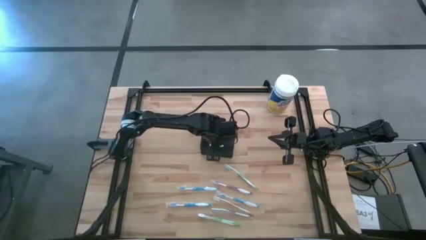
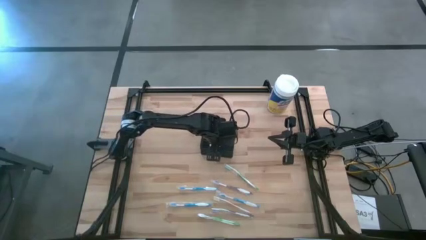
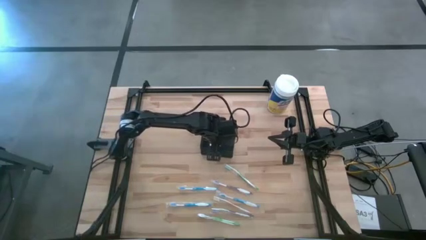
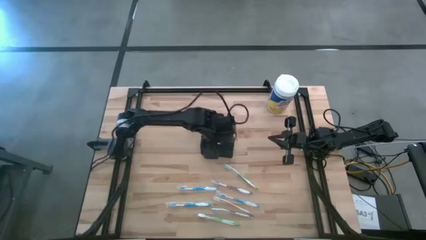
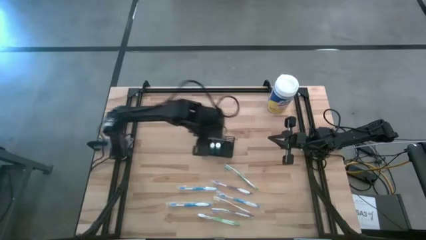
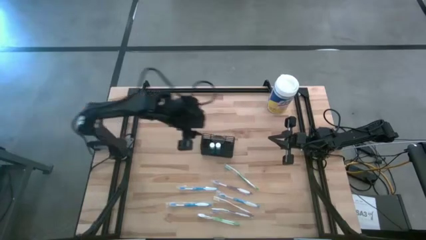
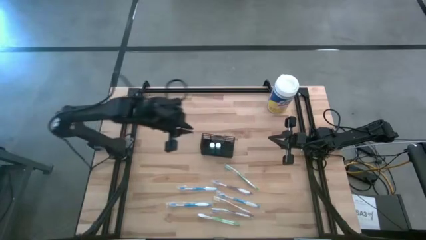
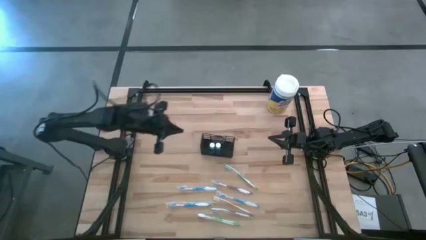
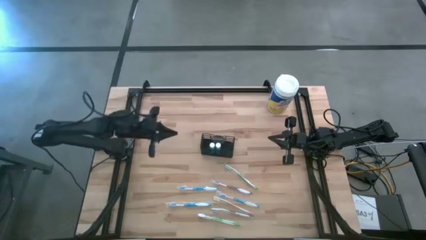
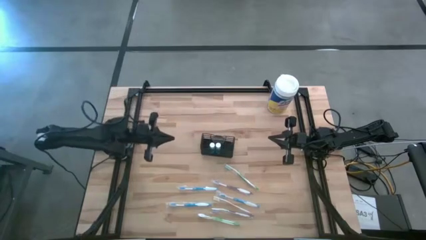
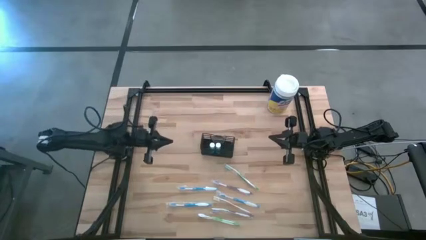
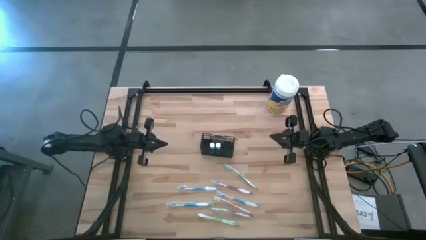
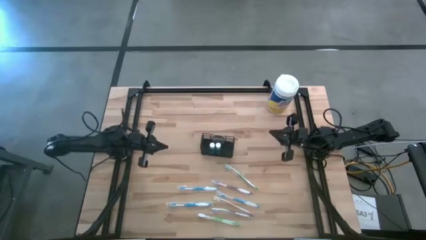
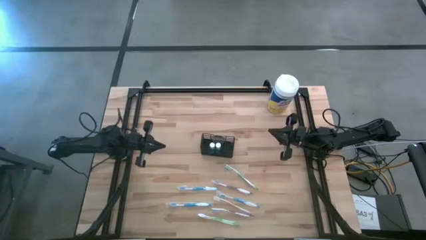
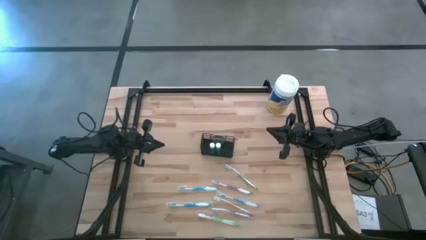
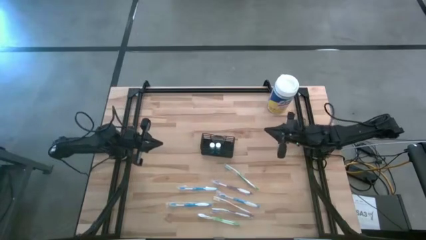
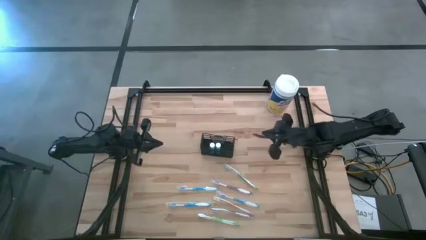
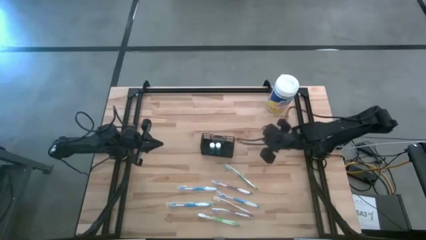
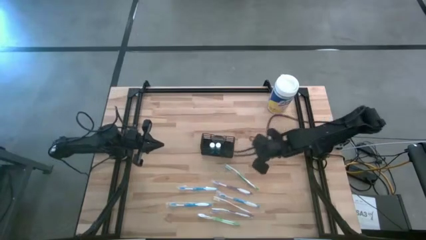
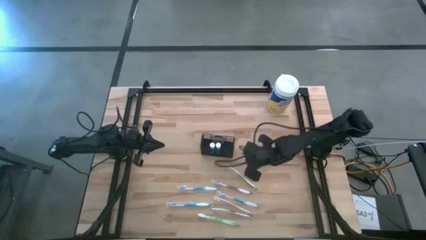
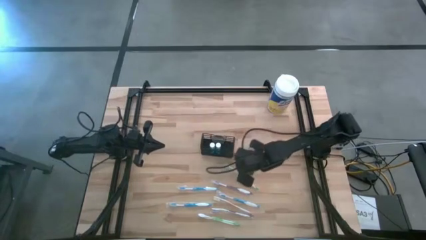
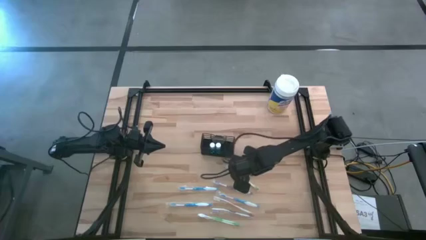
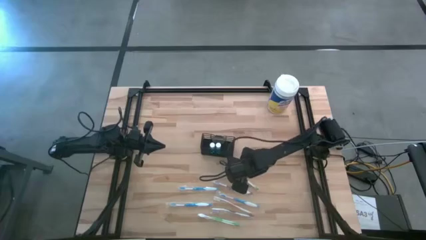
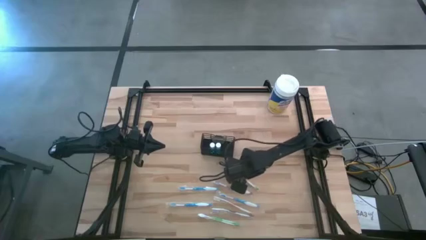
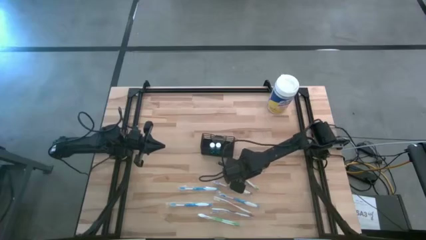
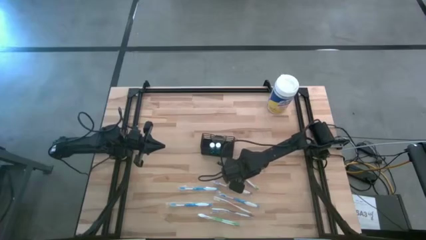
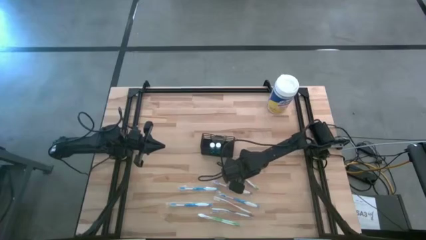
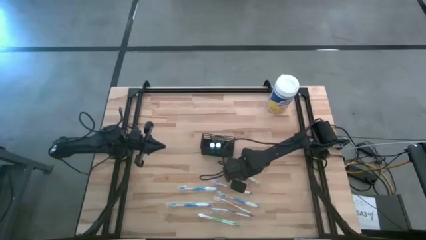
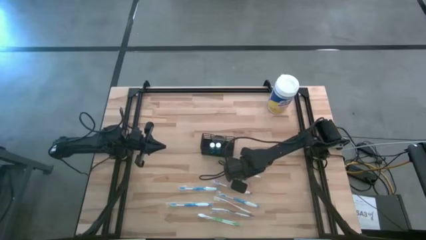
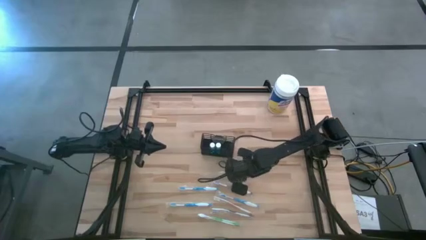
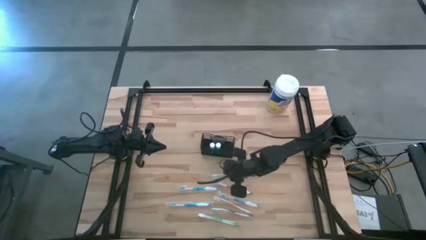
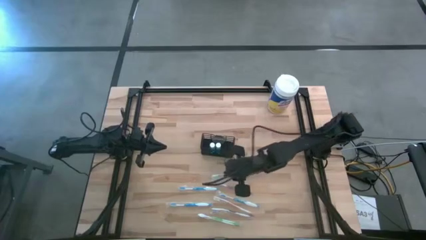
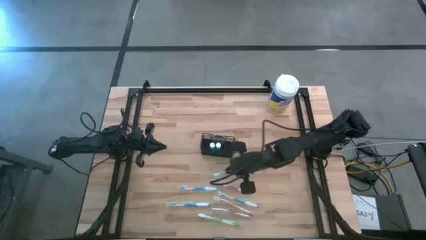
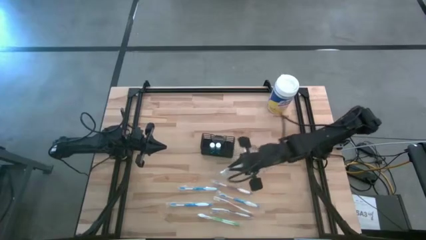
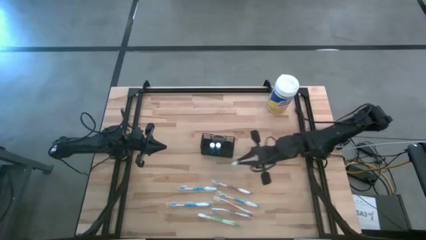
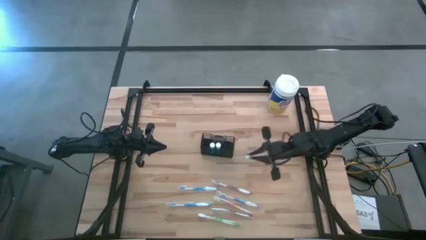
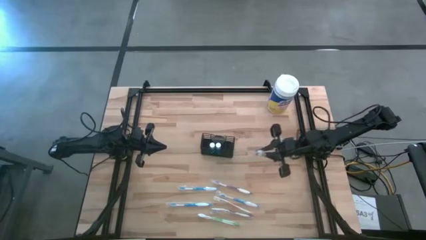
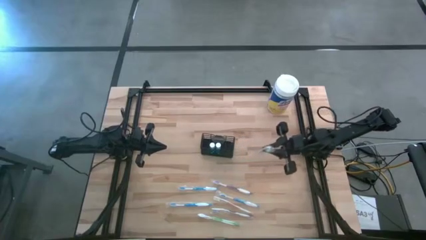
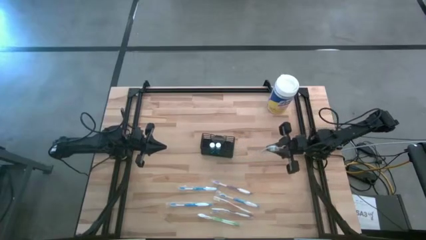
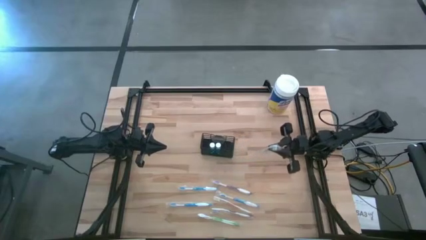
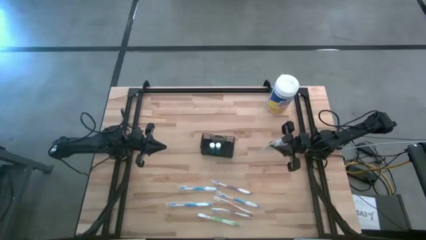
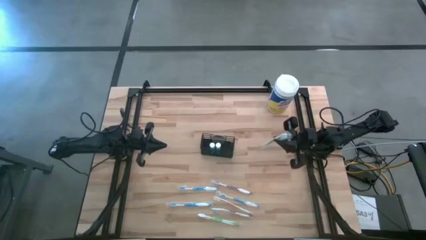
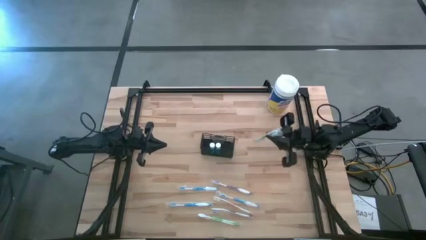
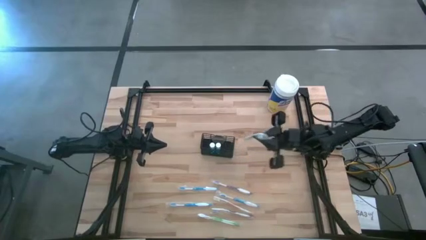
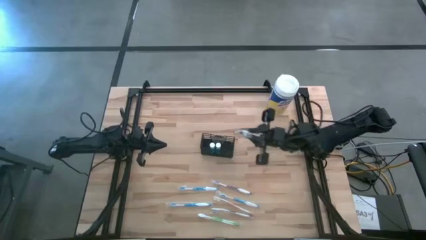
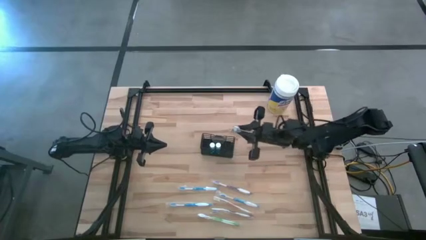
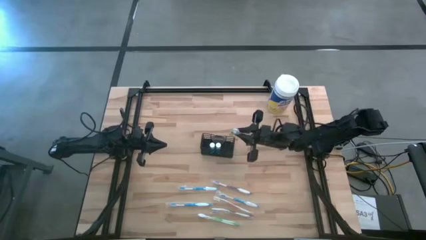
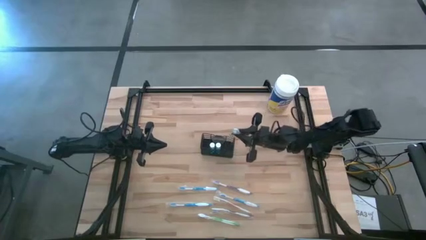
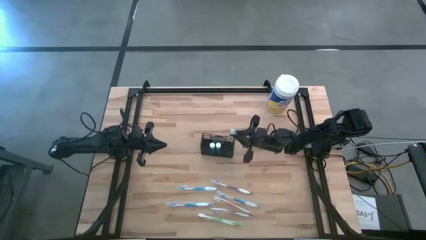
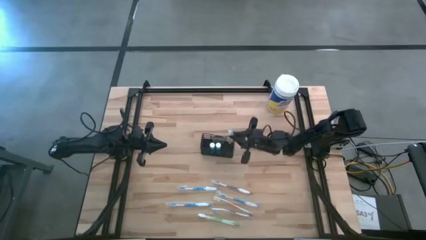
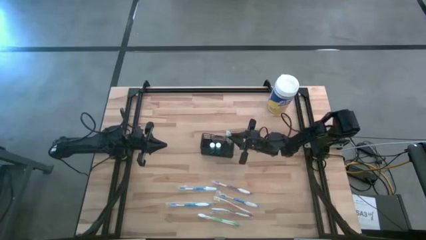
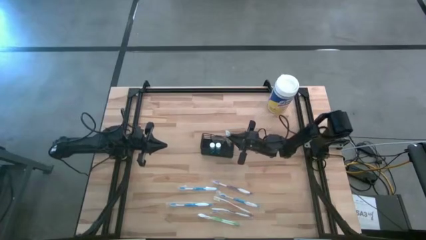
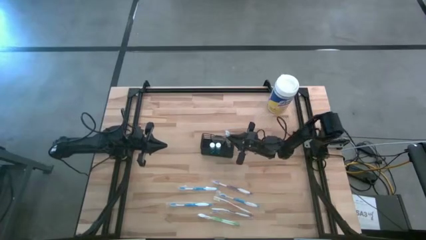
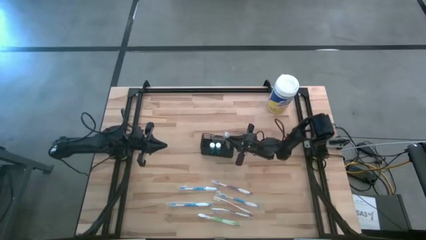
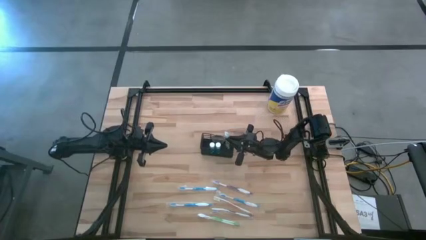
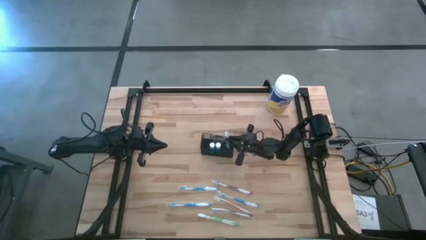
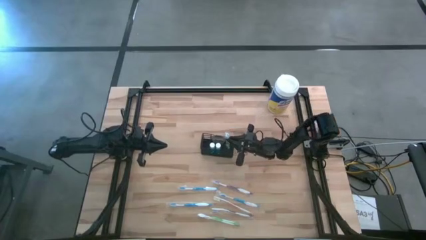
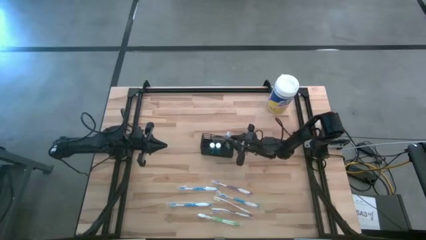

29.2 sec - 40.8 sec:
Task: Pick & Place toothbrushing station
Put the top green toothbrush into the wire organizer

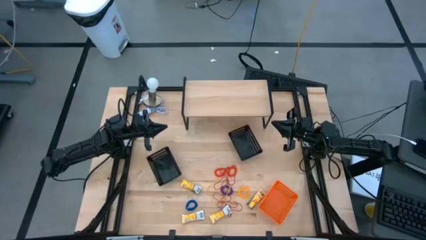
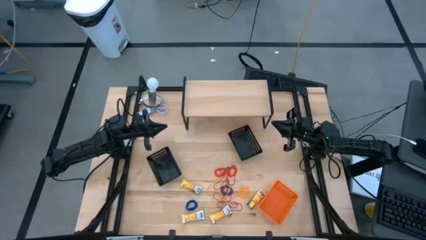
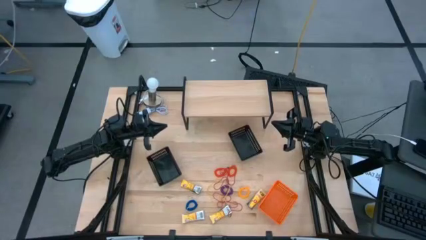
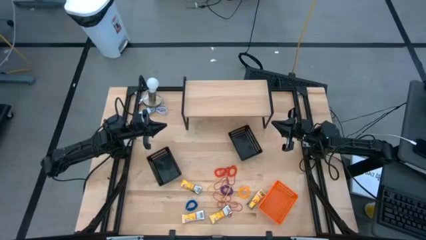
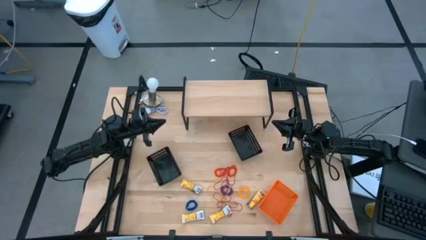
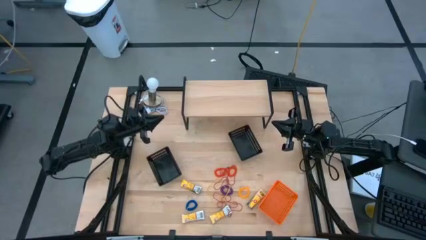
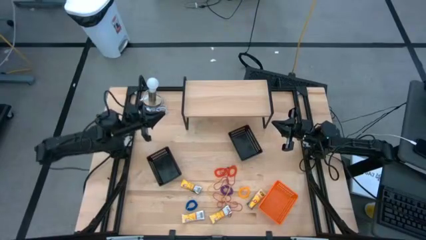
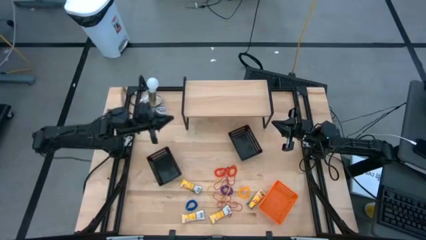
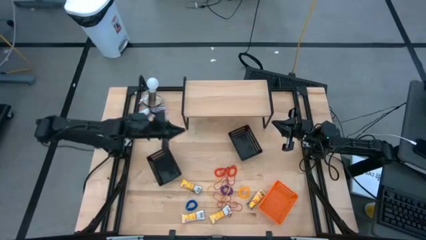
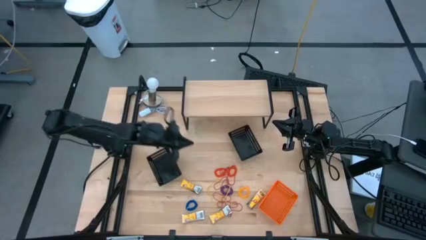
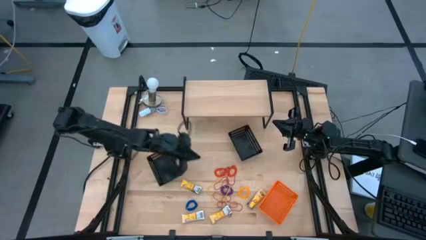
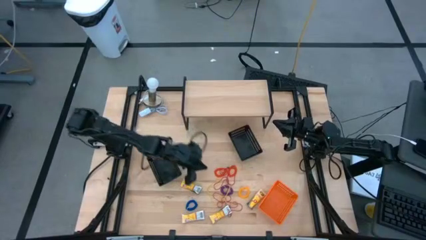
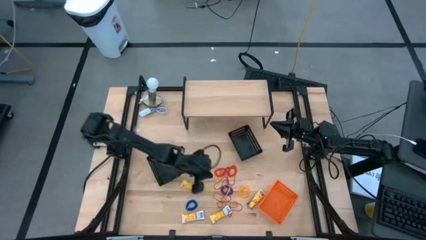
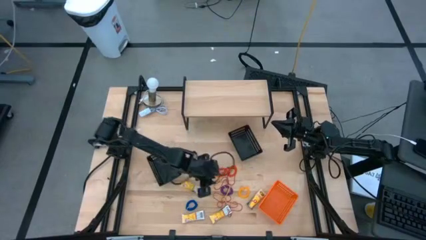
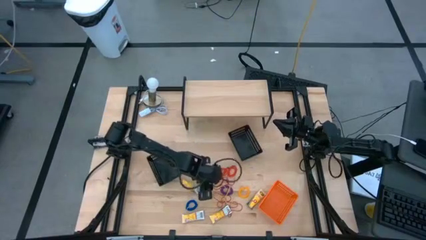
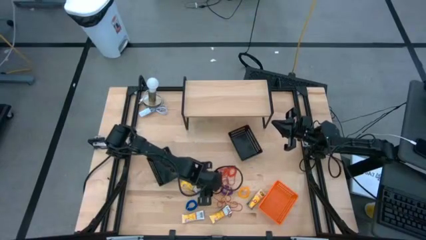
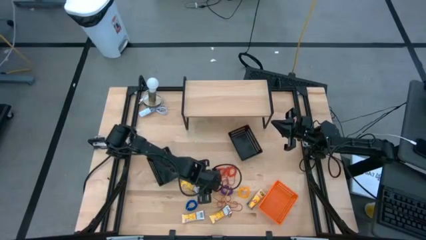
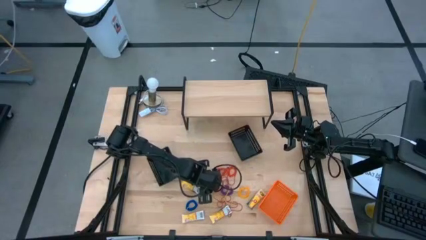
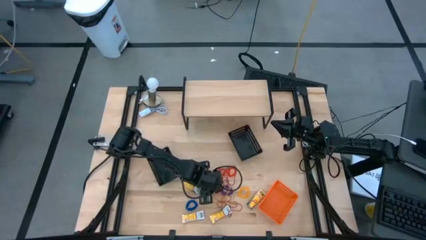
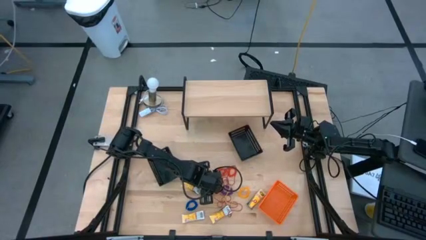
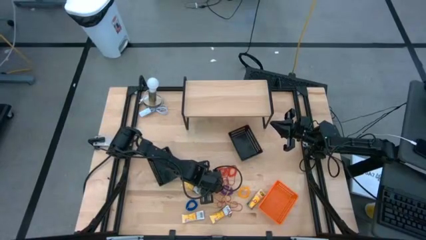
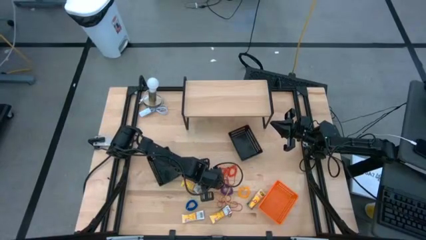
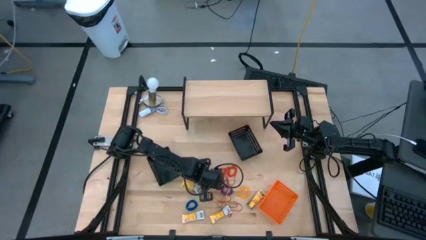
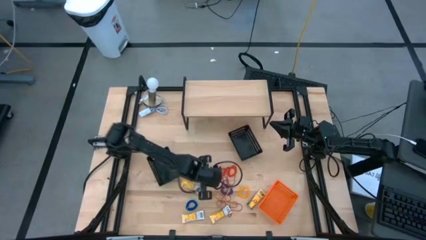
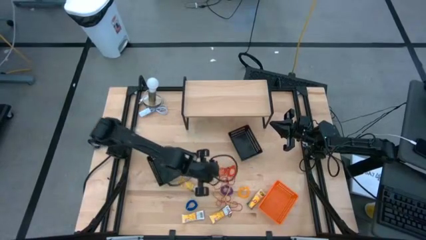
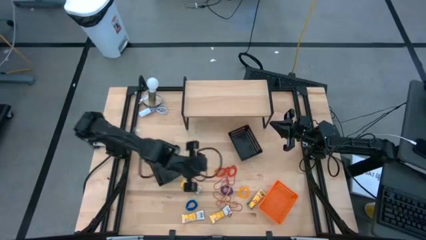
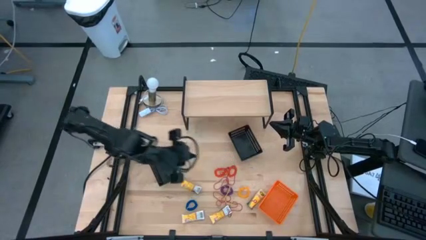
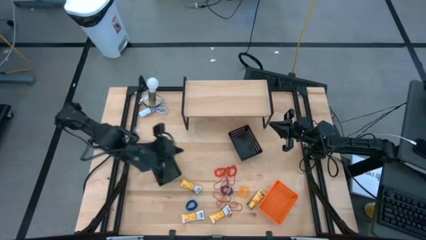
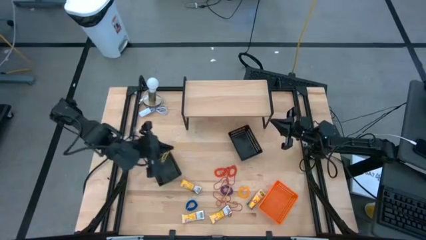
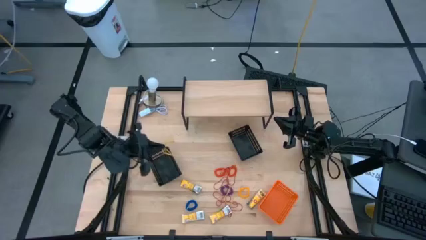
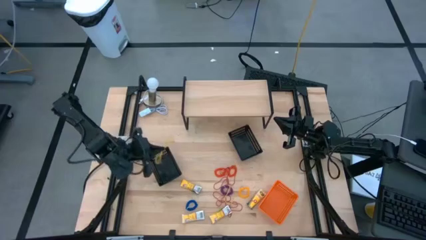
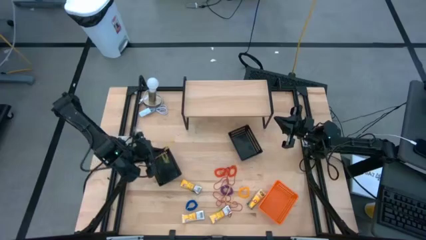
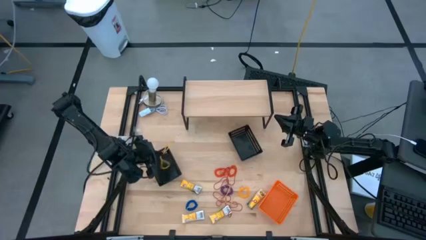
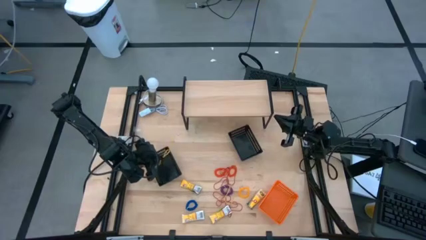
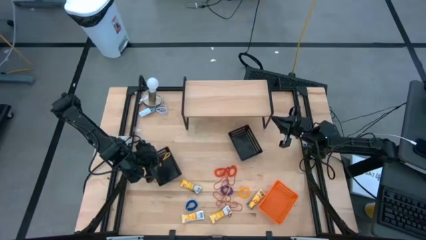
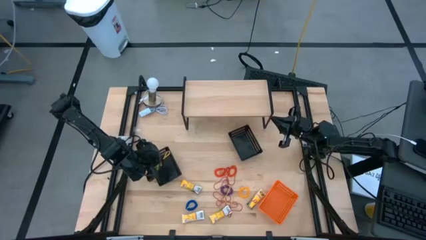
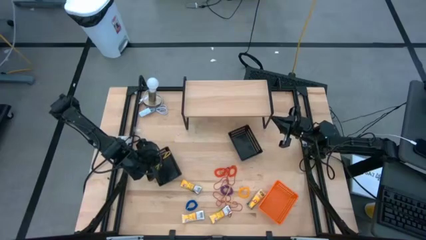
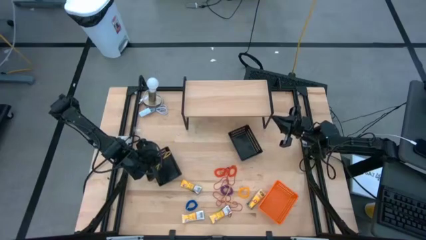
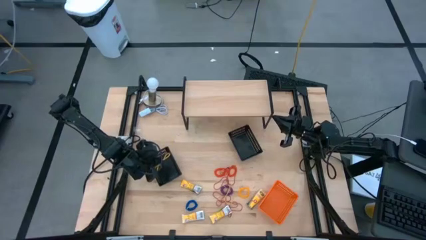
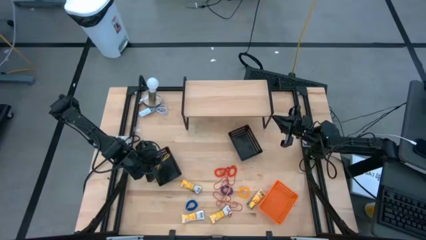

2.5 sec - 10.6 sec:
Task: Pick & Place Office Desk Supplies
Put the yellow rubber band into the left black bin
